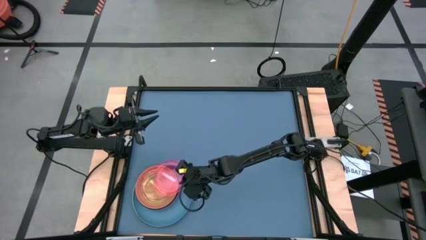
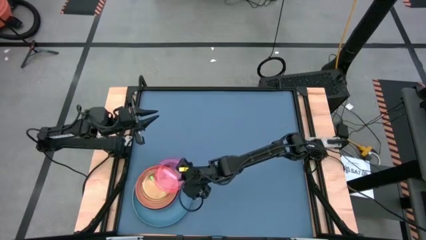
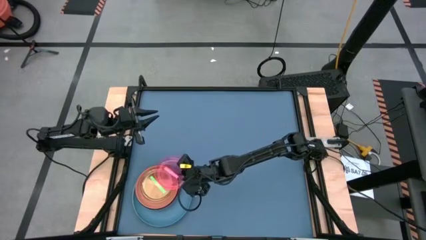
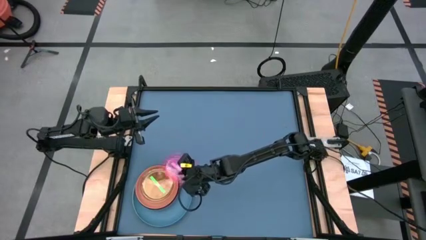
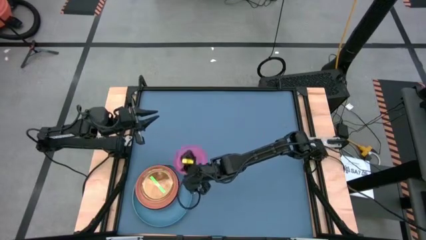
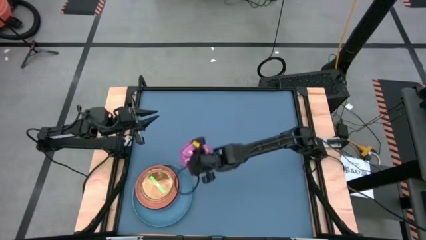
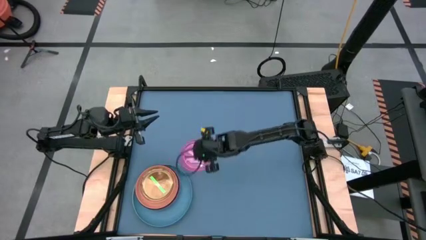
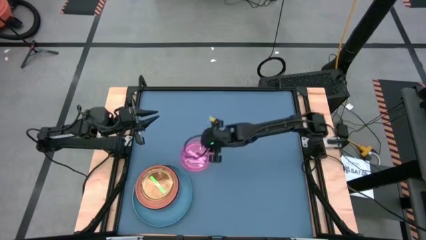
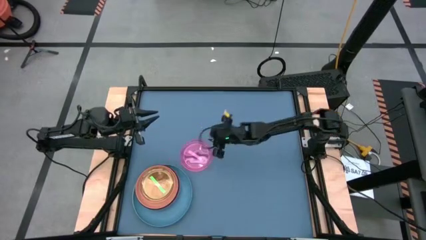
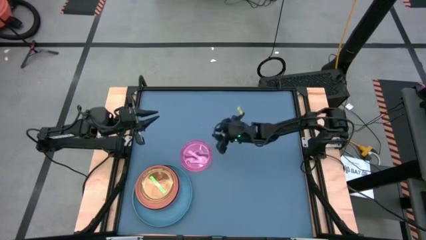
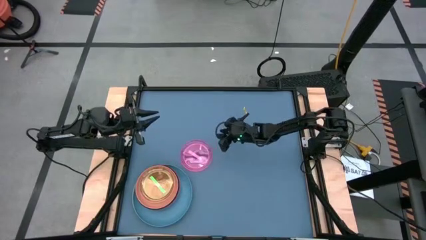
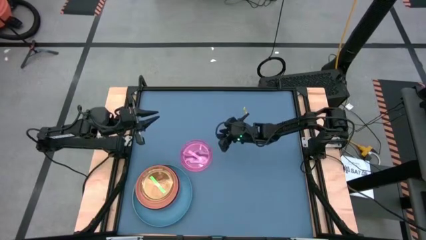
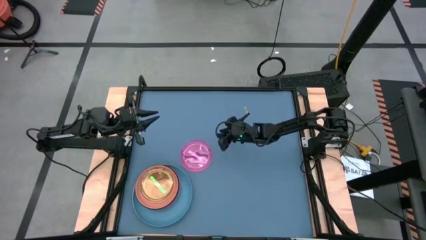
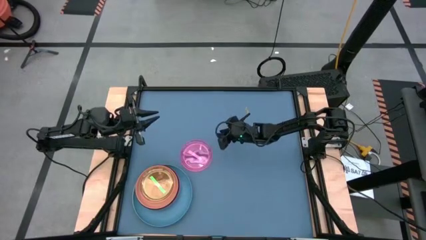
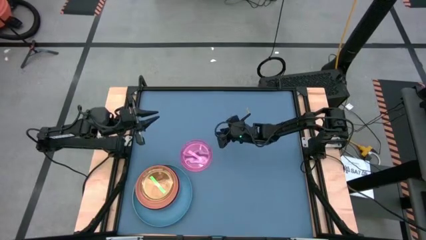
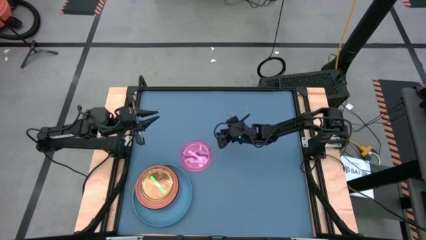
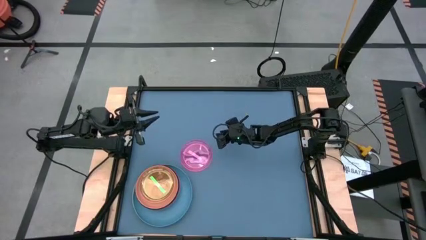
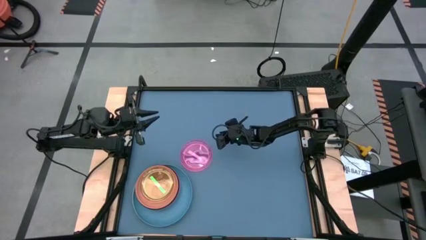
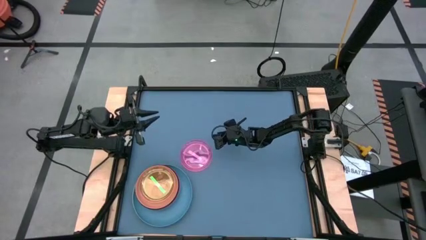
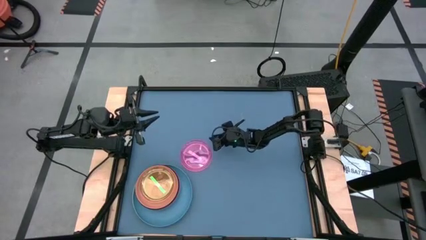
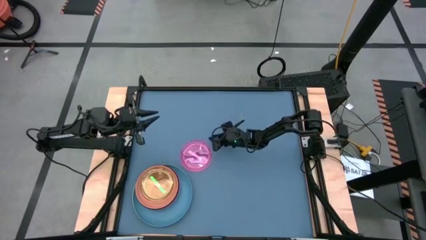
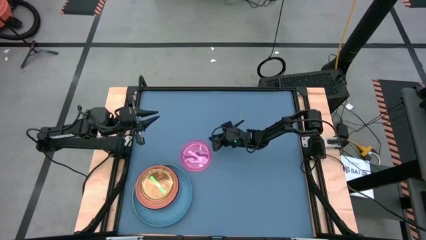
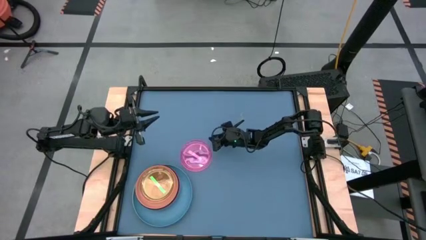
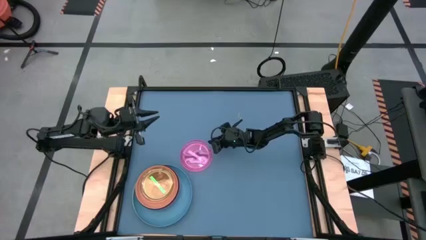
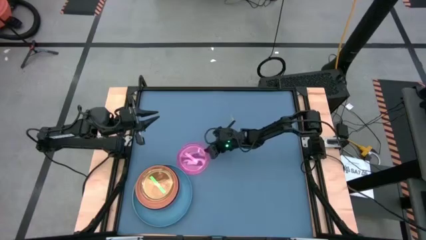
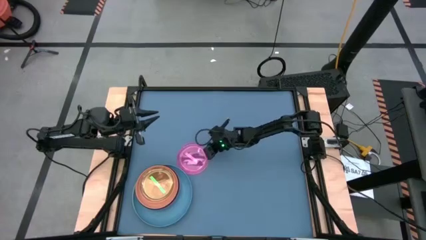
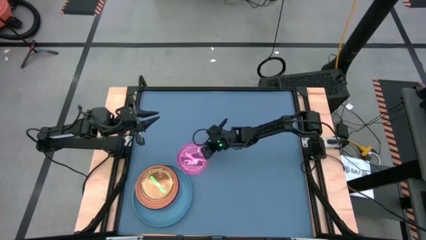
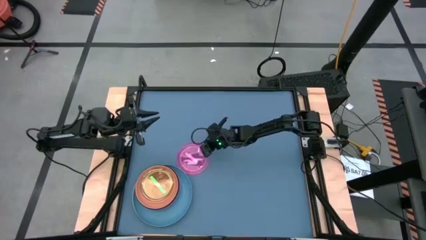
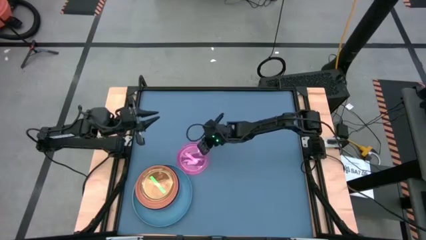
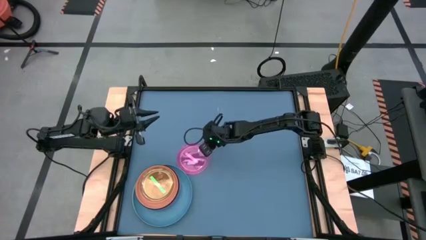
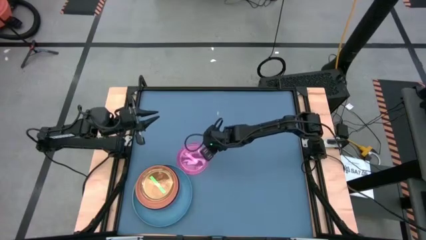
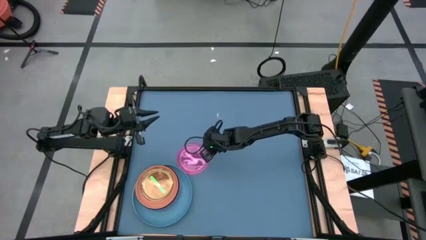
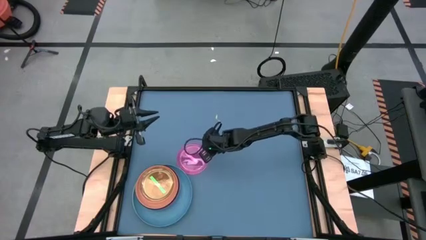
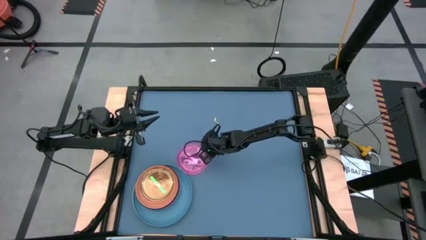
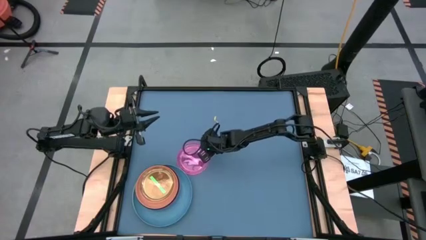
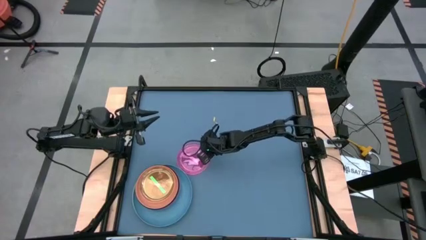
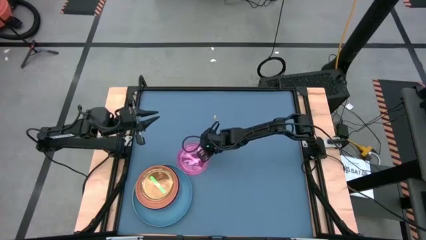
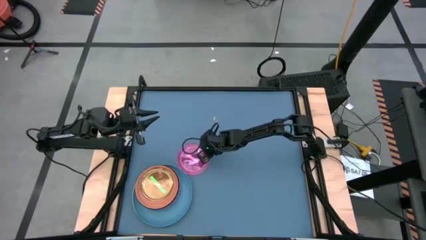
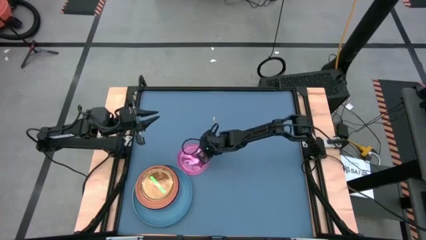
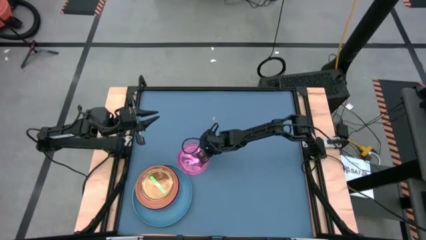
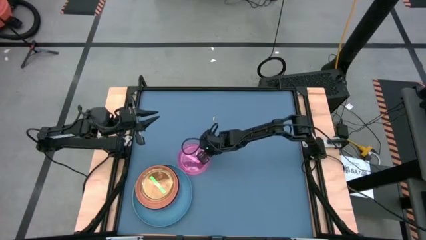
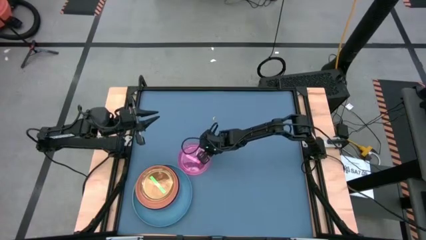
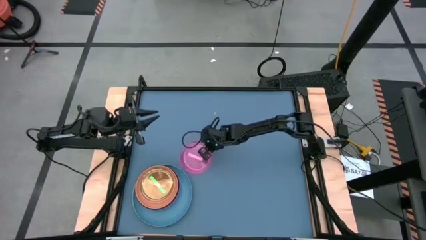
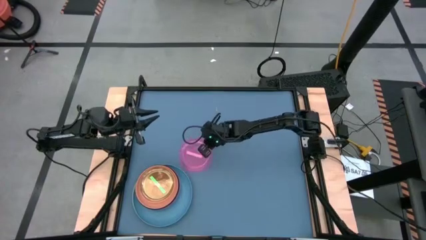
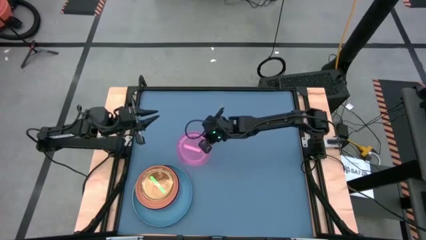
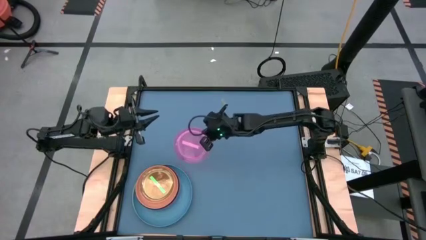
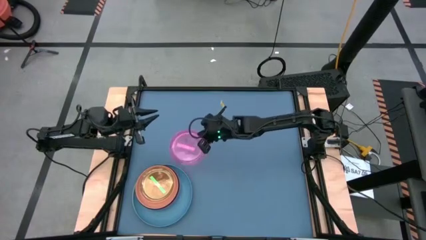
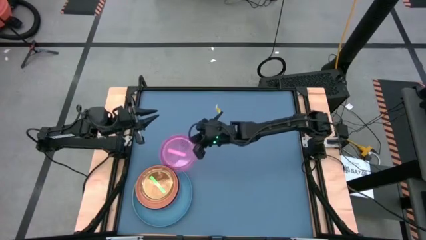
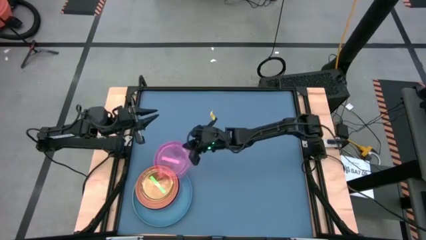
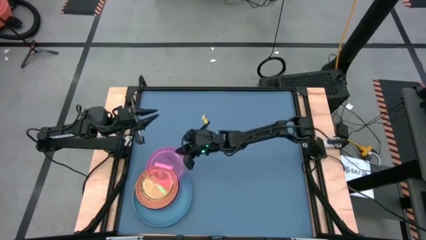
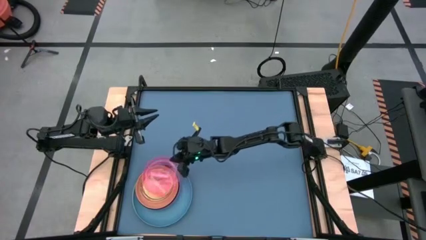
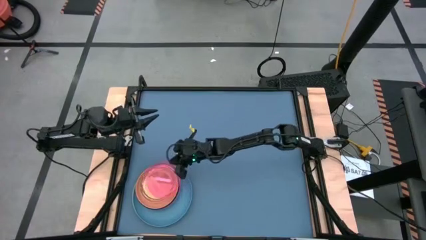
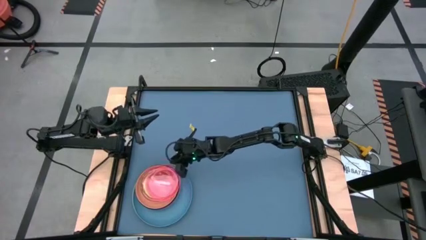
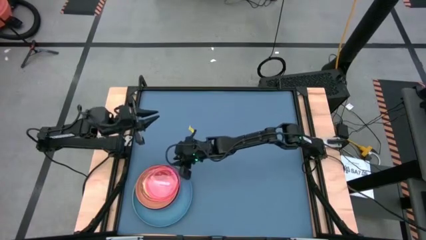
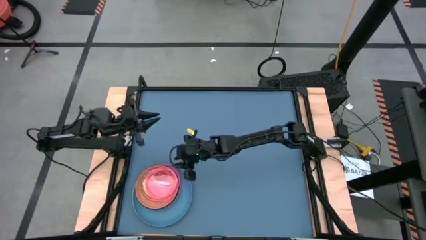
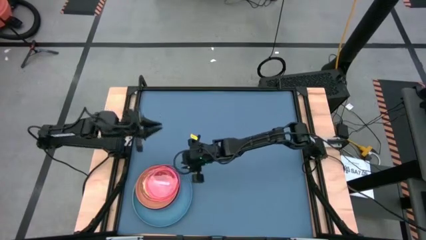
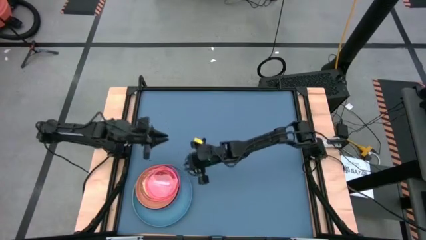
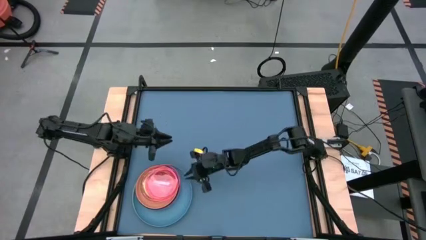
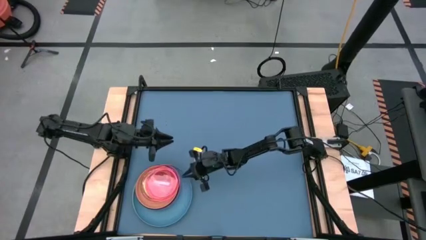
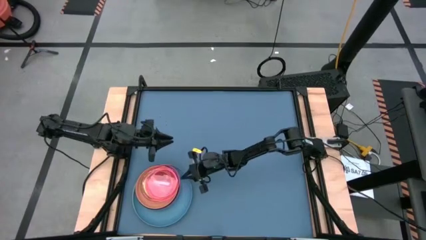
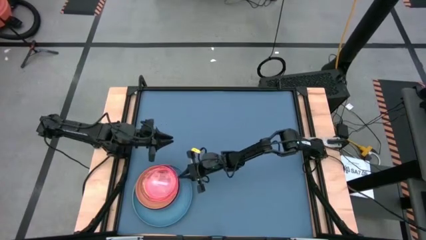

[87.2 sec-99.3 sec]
Task: Stack plastic plates
Stack the pink plate on top of the green plate

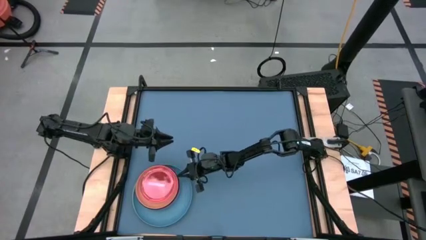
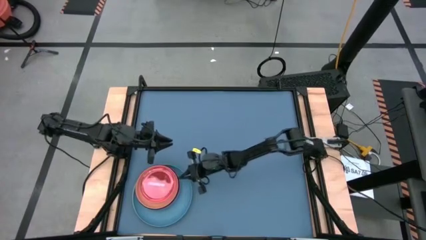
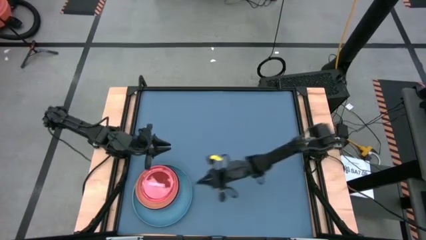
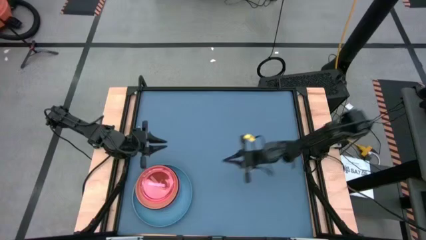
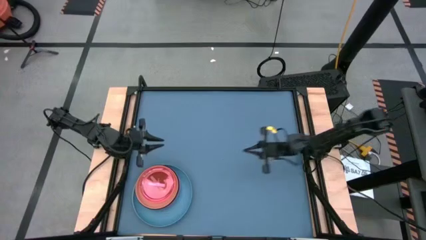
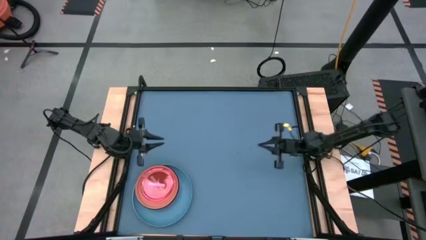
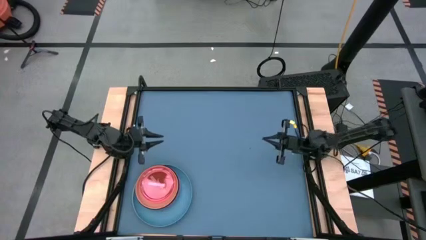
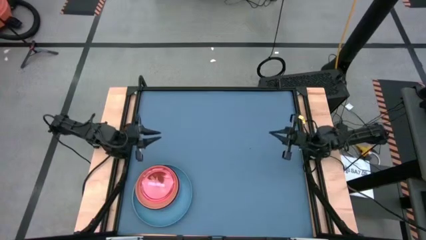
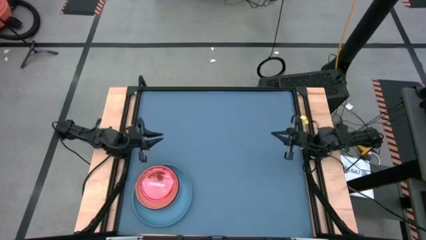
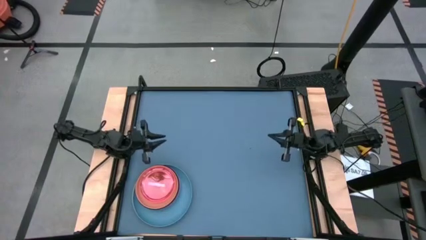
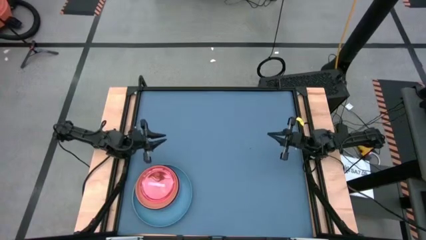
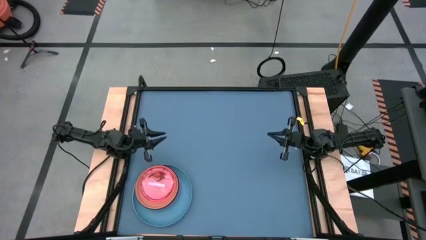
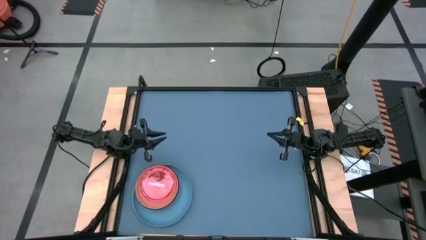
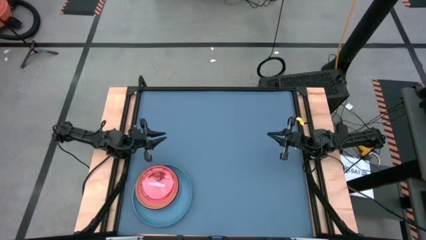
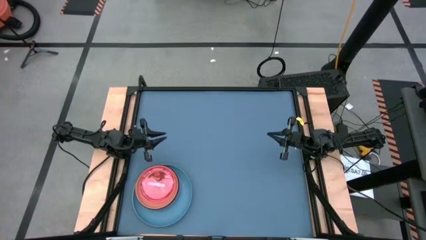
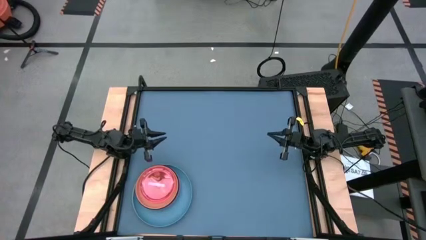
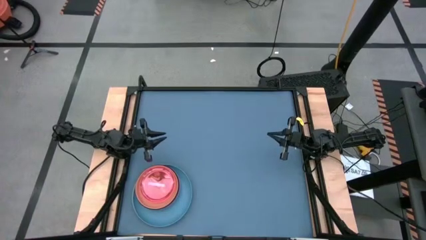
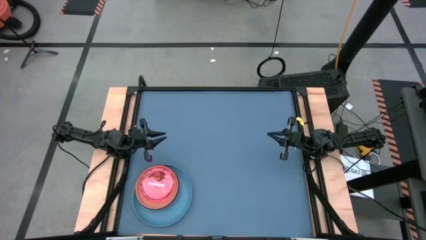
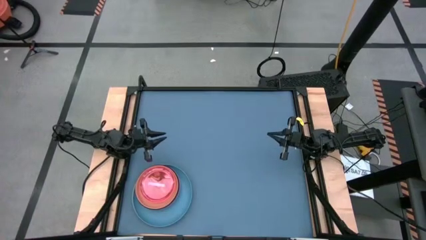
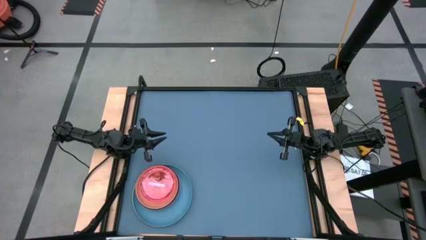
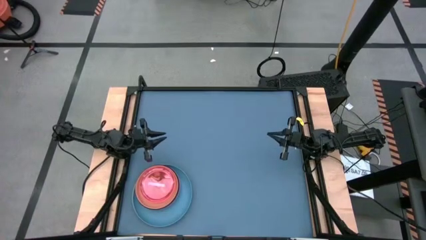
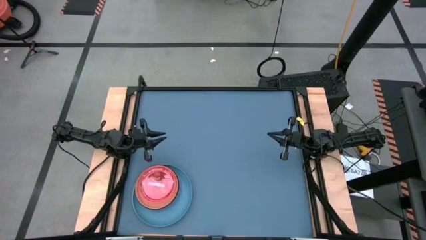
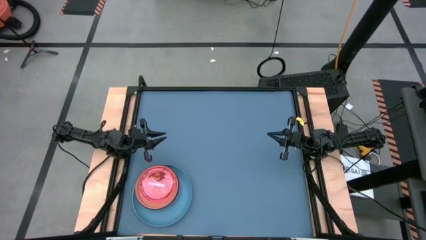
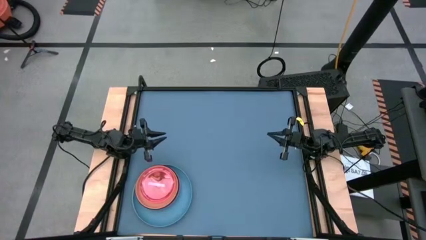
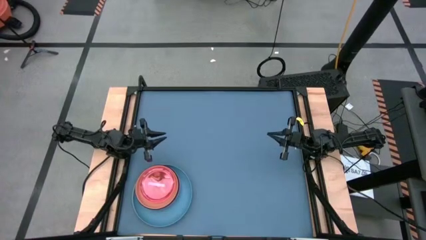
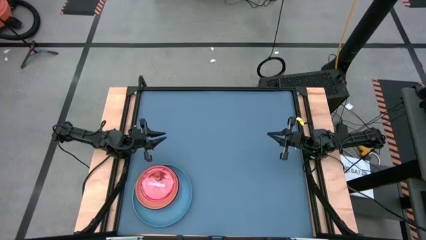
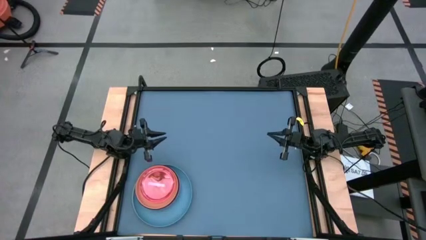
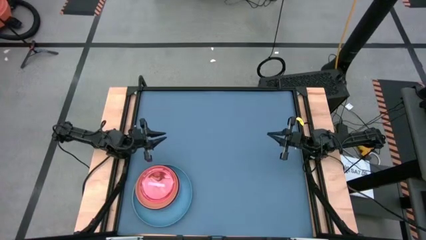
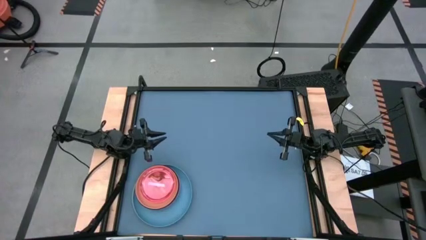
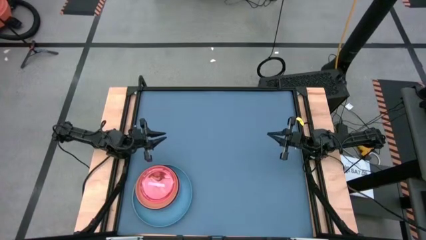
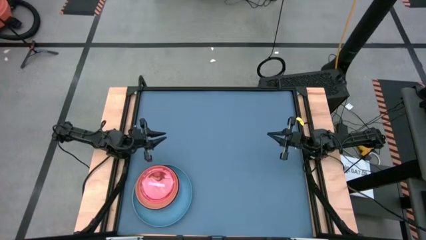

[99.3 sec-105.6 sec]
Return to Home Position
